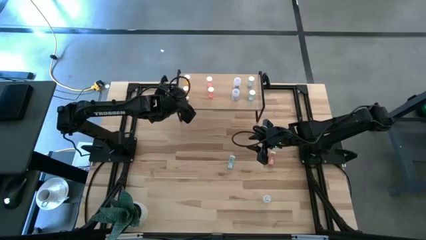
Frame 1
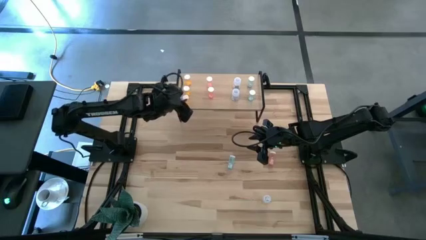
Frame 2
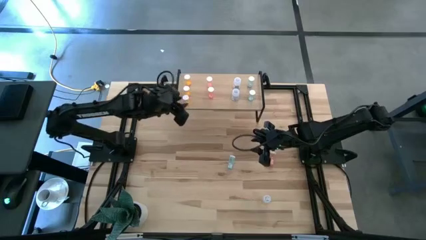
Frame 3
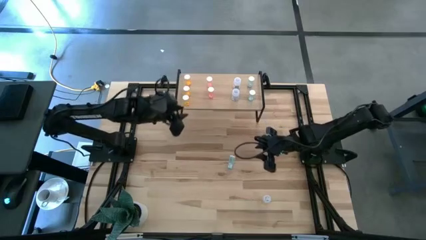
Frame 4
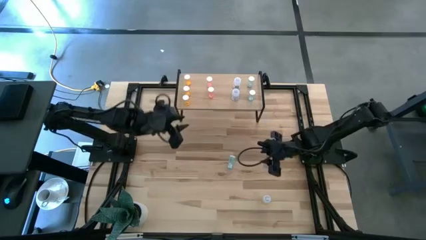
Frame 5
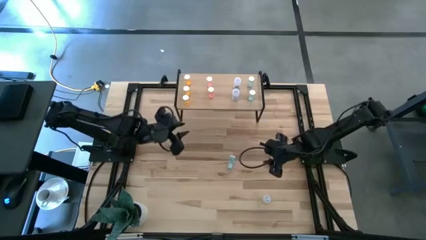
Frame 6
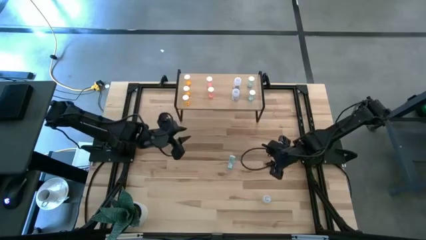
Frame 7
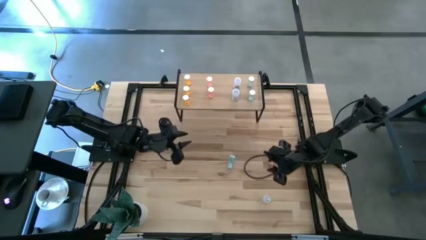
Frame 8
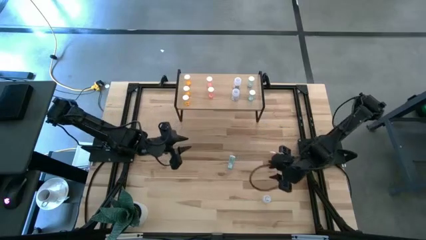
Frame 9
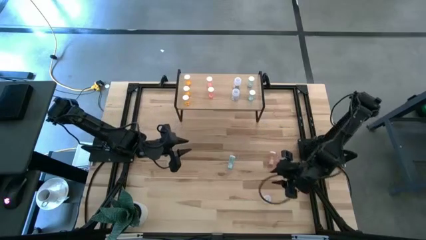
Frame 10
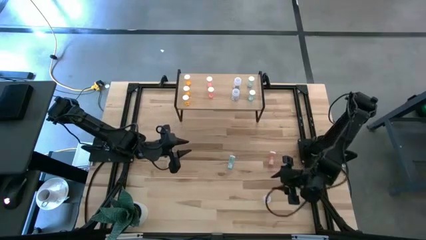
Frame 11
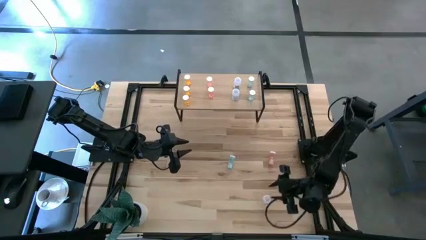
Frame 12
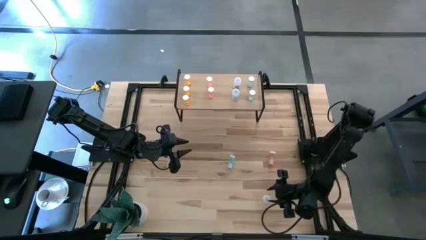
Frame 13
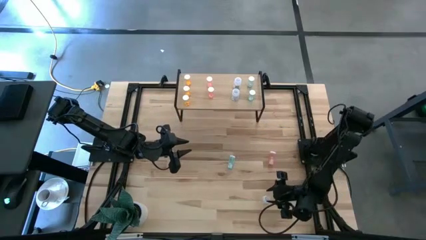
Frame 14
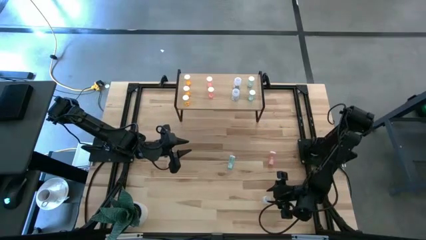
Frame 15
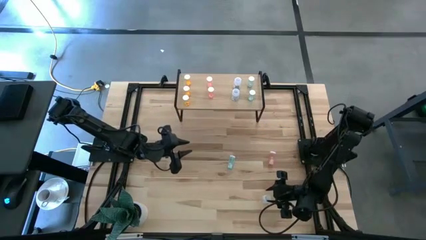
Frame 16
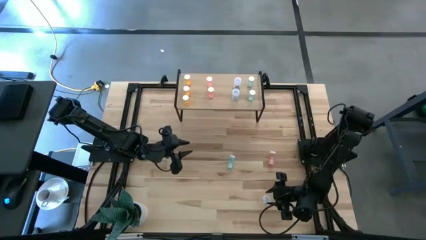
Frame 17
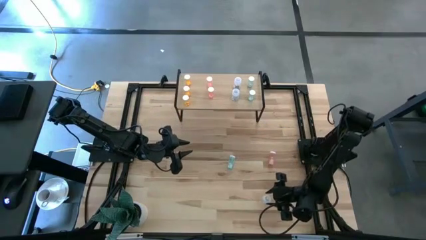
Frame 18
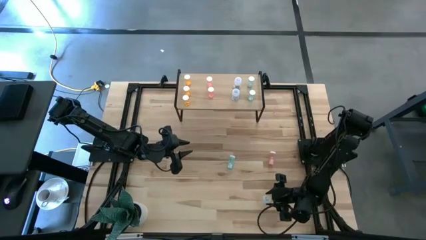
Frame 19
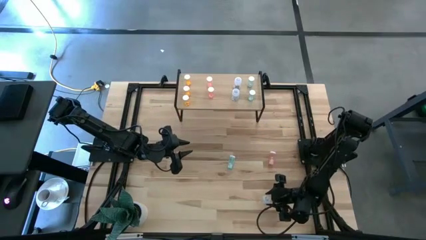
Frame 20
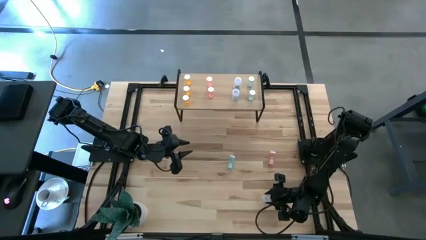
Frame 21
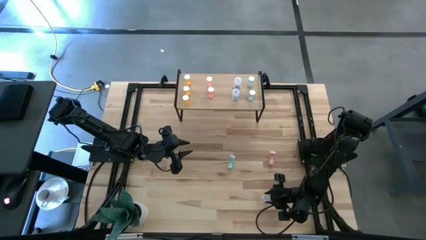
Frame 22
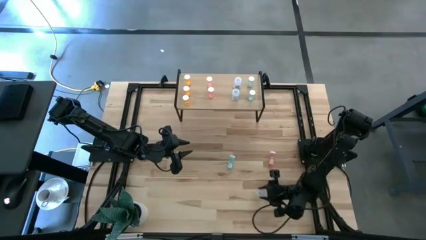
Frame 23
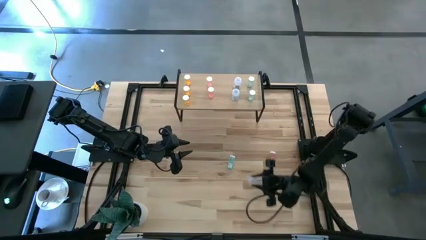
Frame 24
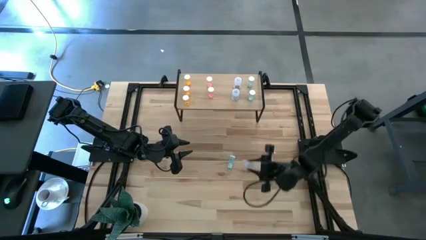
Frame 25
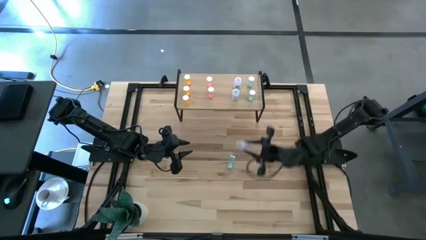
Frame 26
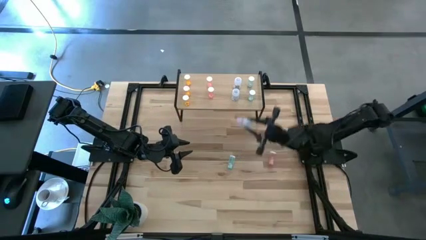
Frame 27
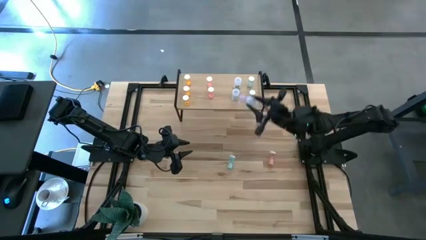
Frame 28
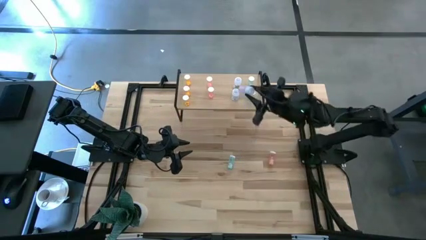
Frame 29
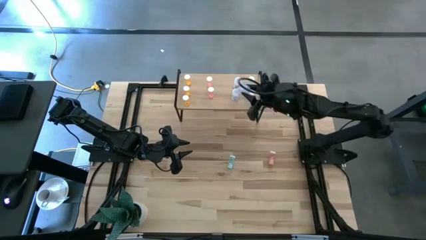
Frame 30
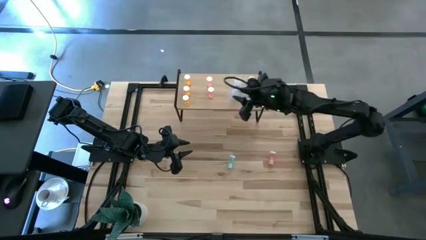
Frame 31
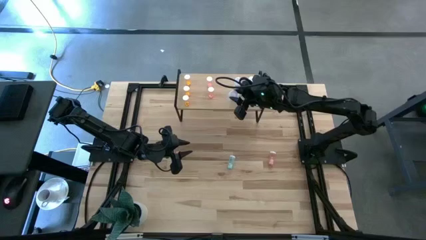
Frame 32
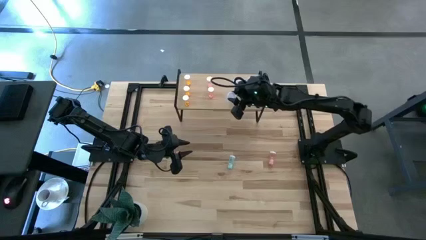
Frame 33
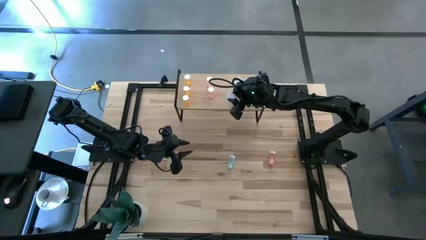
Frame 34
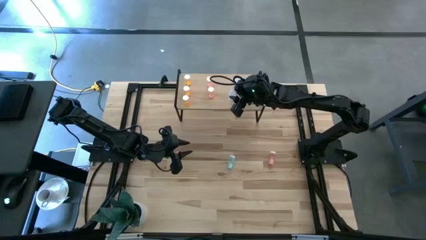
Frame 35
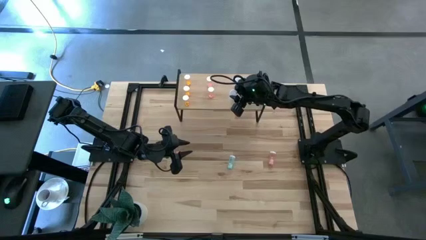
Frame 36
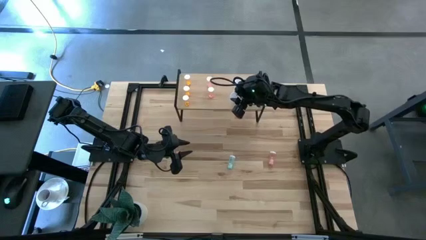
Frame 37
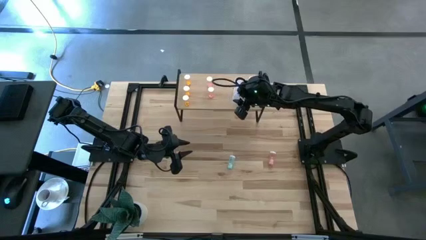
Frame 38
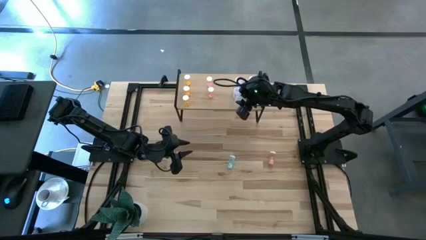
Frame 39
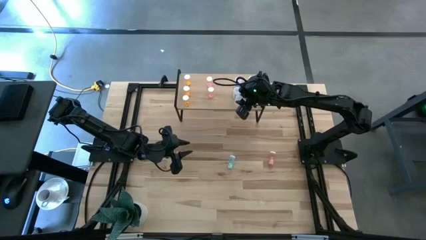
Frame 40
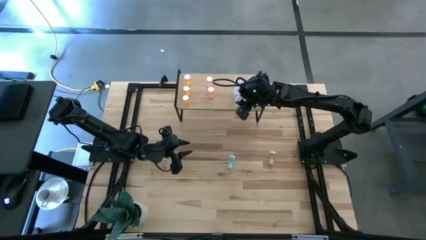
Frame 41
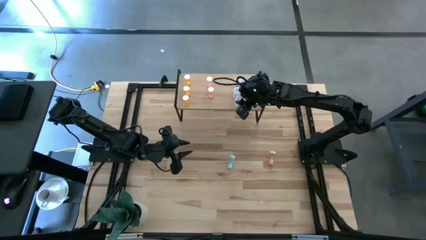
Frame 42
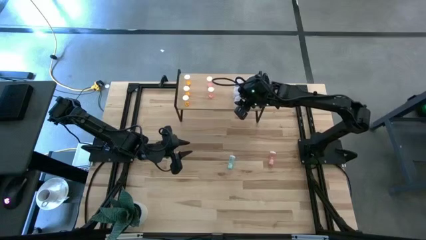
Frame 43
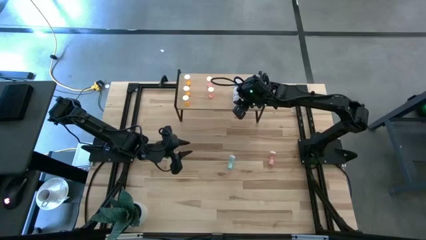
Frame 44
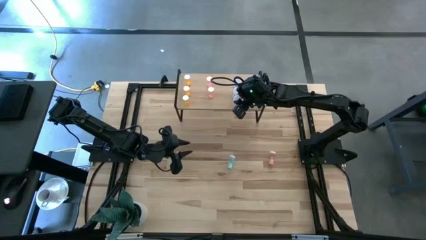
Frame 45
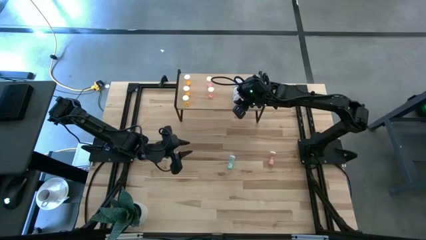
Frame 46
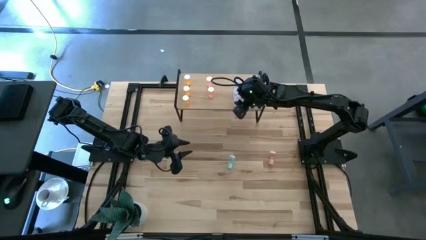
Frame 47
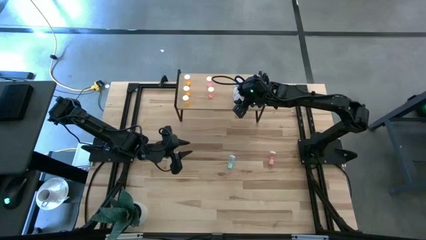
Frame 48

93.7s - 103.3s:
Task: Pick and place medicine bottles onto shelf by color
Align the white pill bottle with the other white pill bottles on the shelf

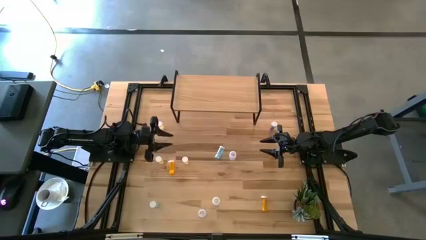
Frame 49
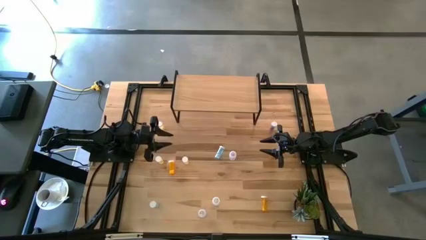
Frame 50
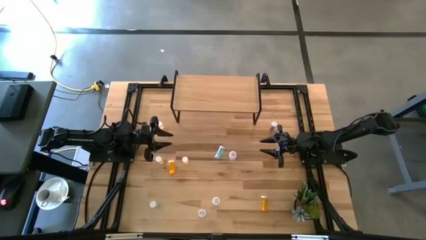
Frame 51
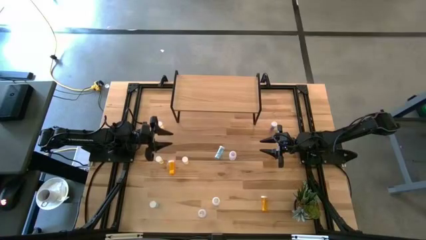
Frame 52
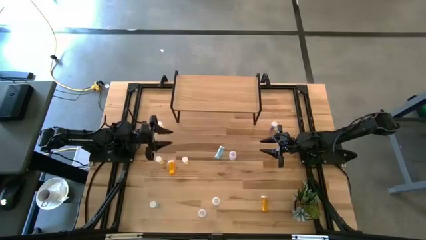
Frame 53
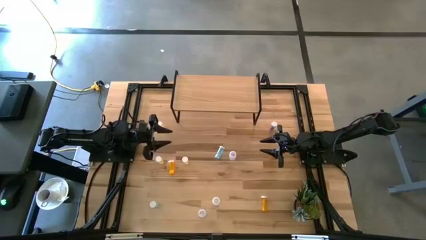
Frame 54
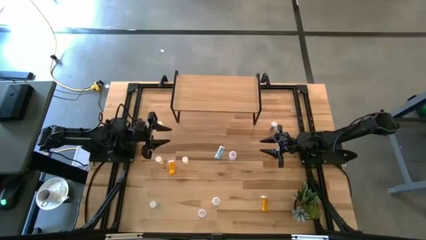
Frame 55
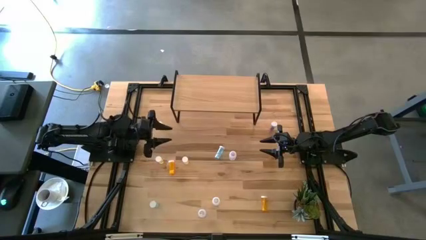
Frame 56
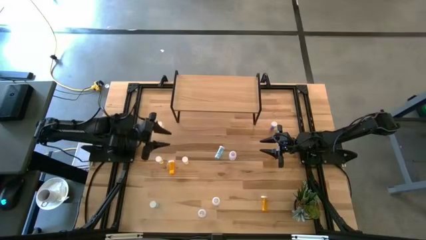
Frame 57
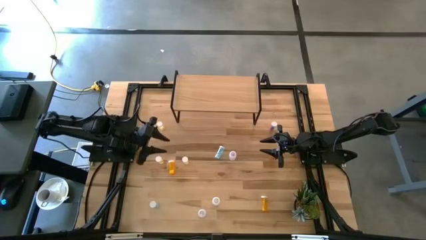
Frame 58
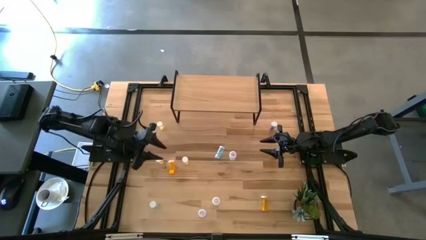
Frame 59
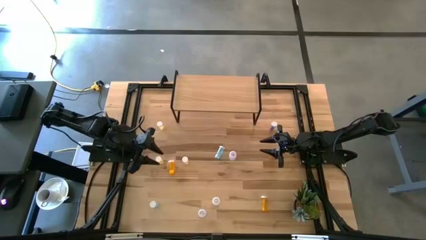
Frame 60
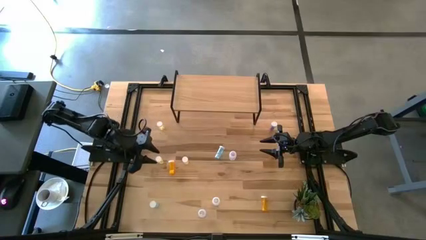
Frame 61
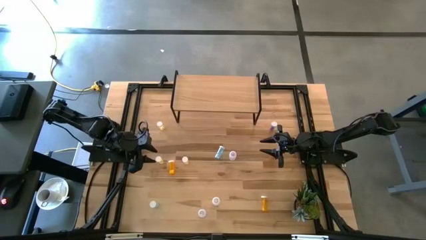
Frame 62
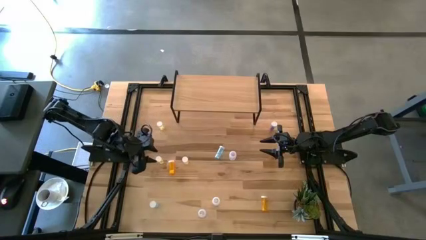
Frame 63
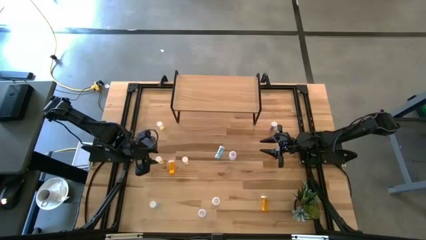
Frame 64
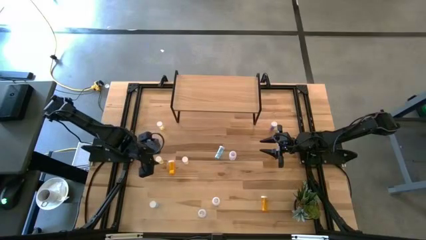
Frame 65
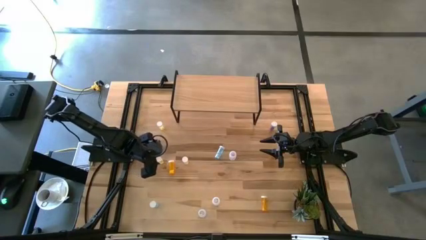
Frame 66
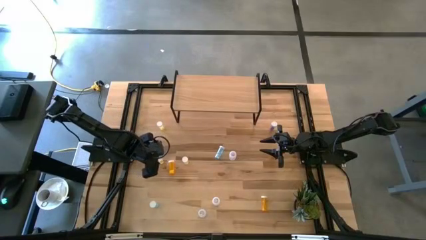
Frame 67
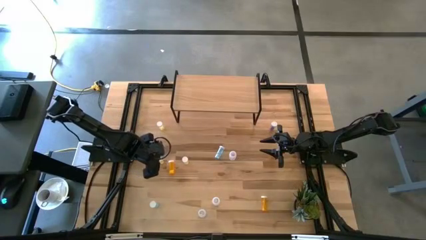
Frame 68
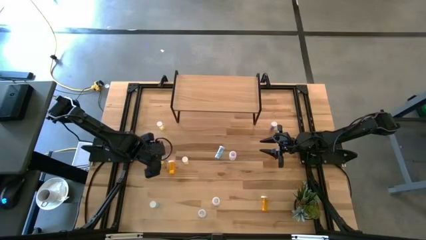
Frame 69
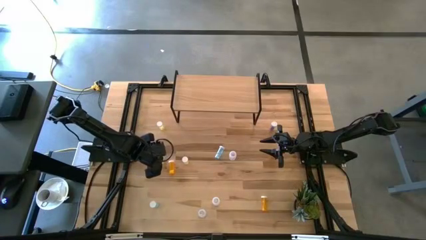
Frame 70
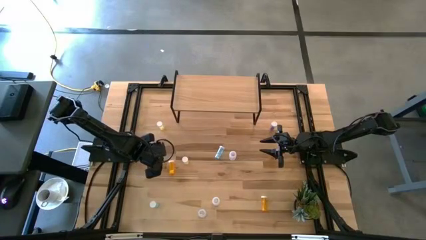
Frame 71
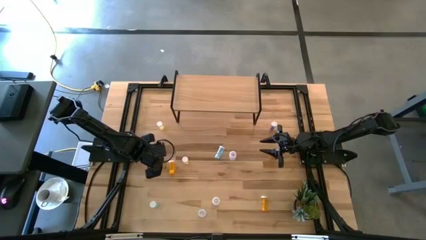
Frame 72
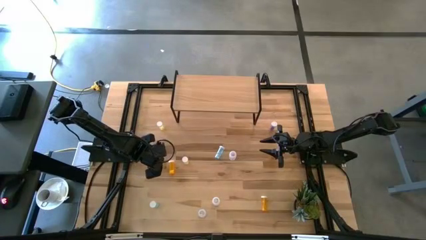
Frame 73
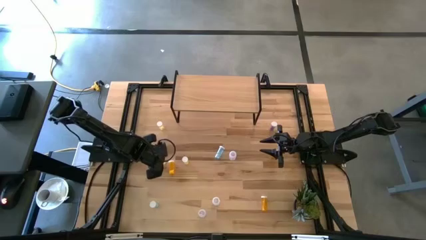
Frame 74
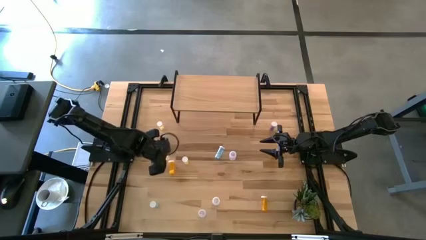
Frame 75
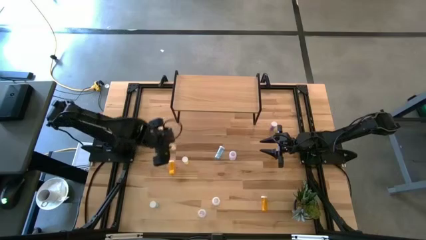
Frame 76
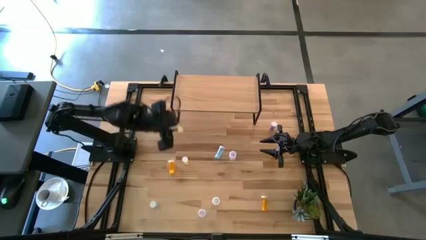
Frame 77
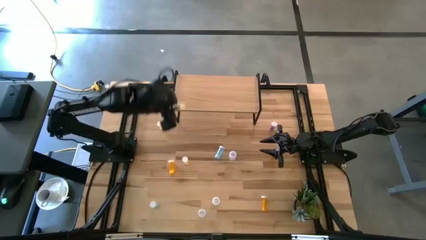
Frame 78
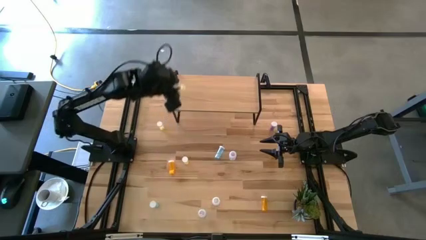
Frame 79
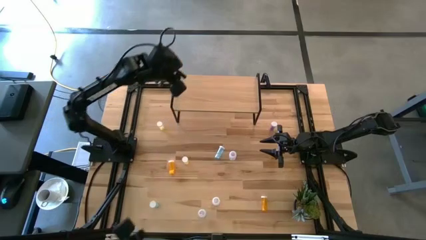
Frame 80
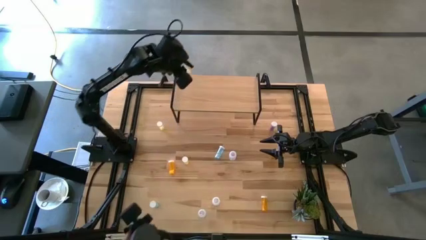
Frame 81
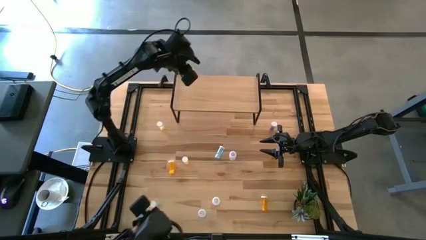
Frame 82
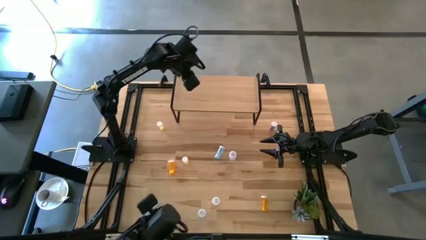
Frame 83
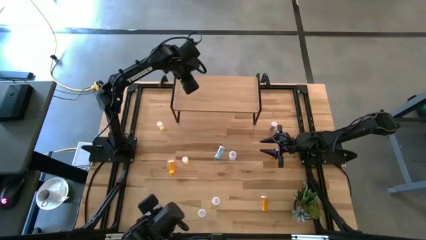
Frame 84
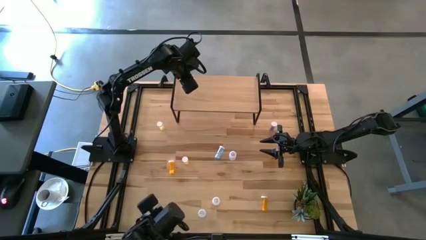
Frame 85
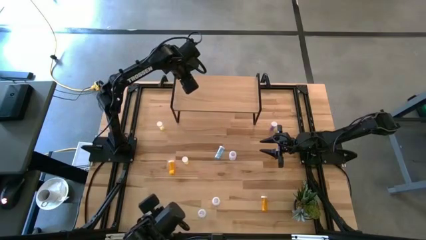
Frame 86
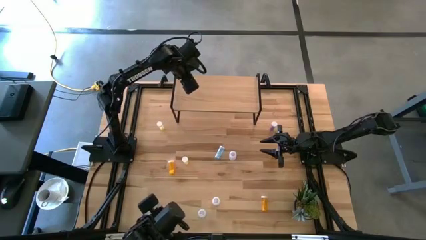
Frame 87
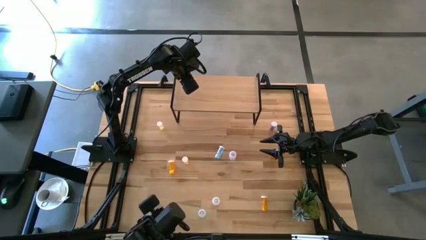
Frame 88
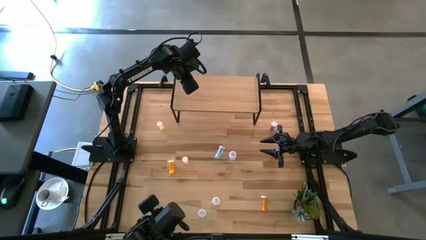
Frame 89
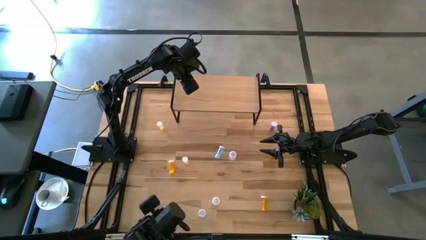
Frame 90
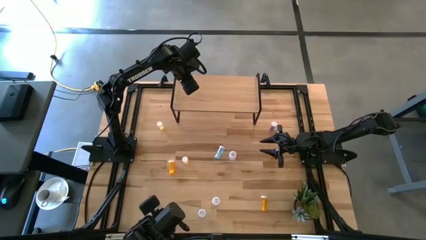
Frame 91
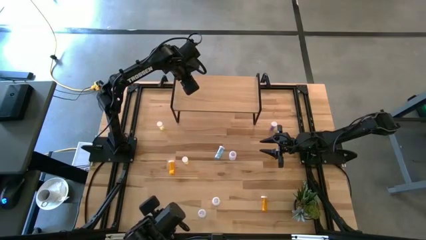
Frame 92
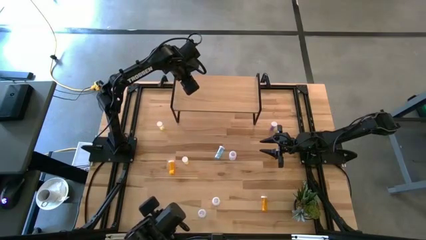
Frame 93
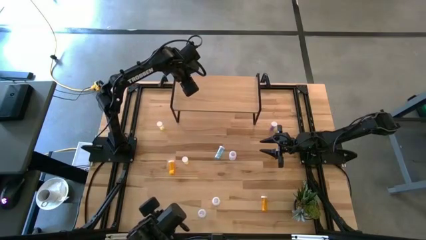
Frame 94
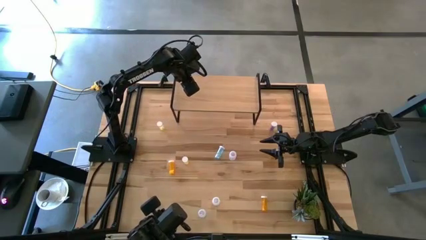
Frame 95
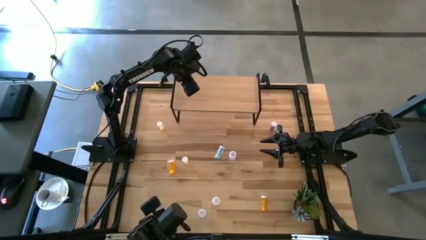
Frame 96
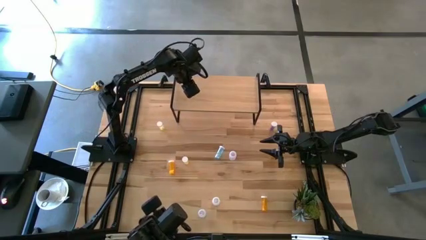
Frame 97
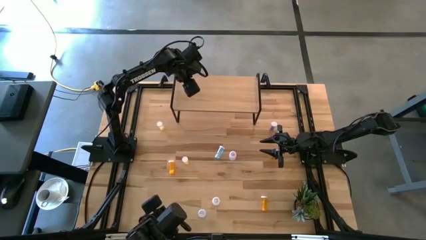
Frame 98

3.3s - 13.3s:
Task: Pick and place medicine bottles onto shelf by color
Put the bottom right yellow pill bottle on the shelf
